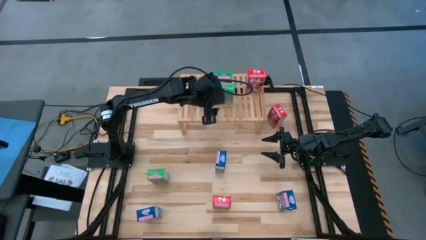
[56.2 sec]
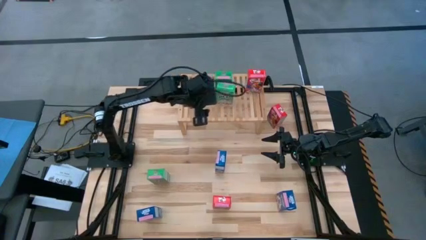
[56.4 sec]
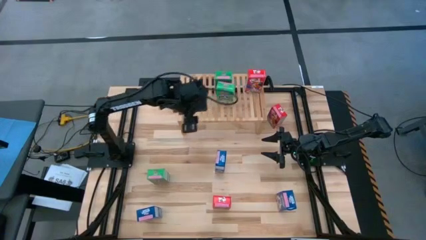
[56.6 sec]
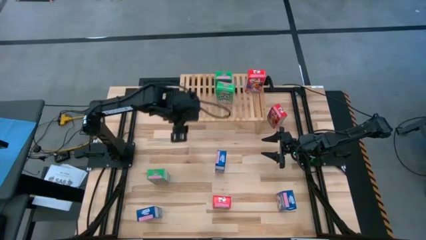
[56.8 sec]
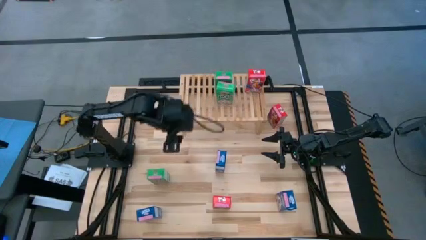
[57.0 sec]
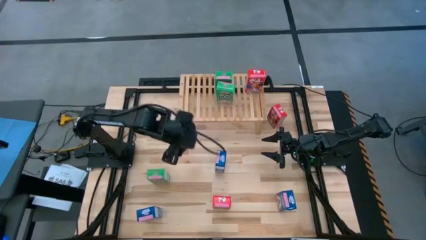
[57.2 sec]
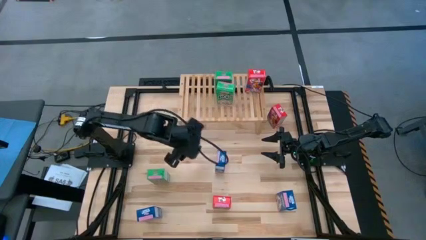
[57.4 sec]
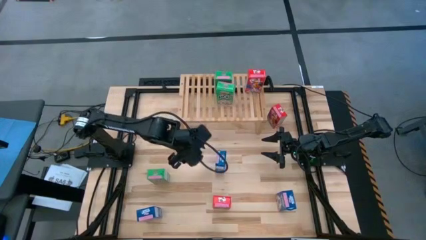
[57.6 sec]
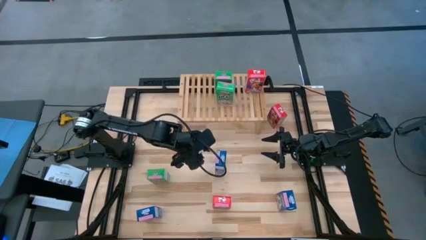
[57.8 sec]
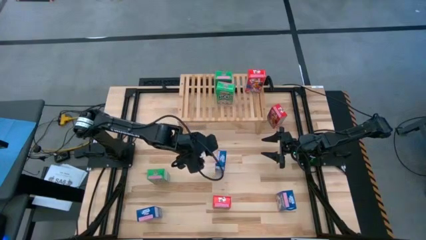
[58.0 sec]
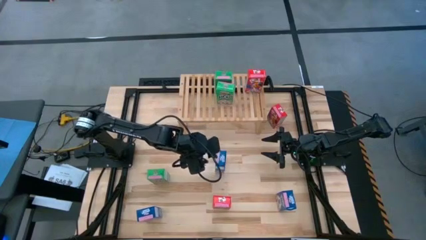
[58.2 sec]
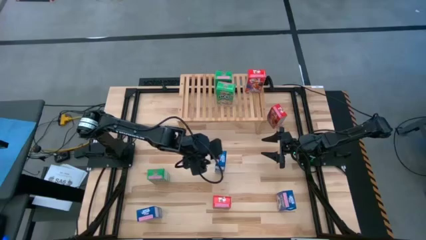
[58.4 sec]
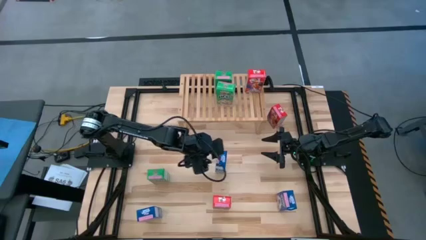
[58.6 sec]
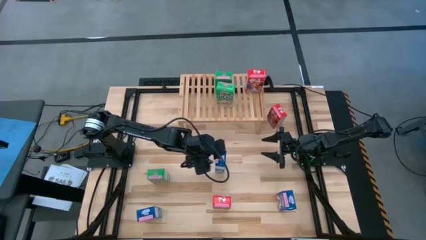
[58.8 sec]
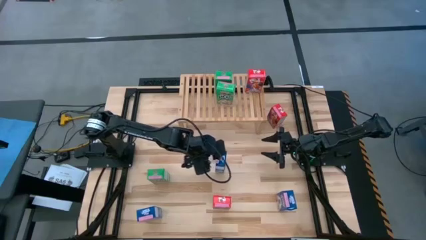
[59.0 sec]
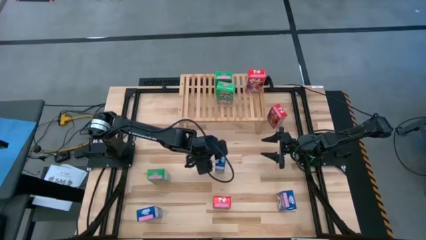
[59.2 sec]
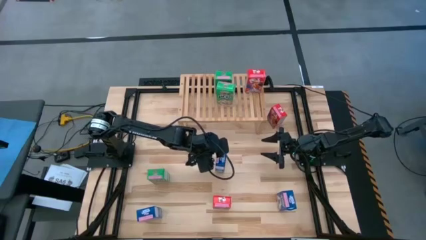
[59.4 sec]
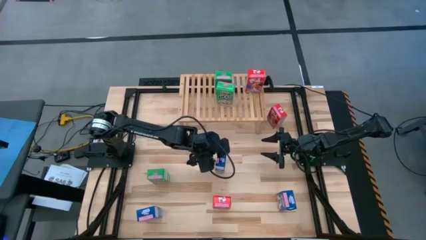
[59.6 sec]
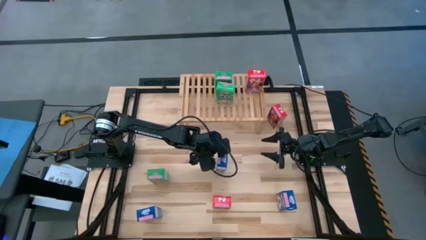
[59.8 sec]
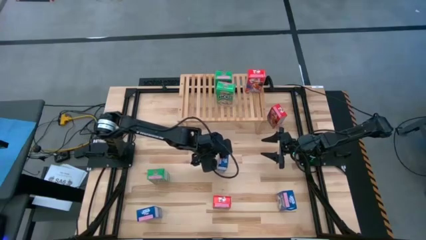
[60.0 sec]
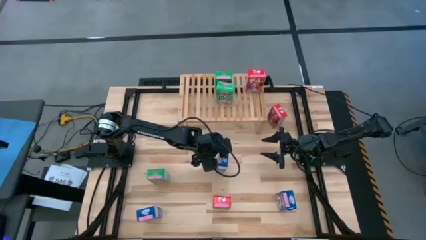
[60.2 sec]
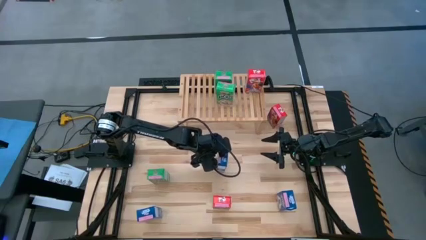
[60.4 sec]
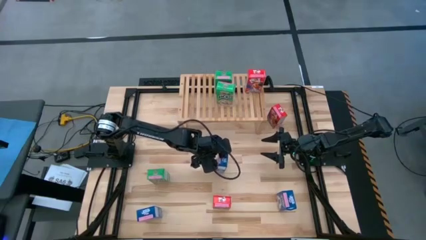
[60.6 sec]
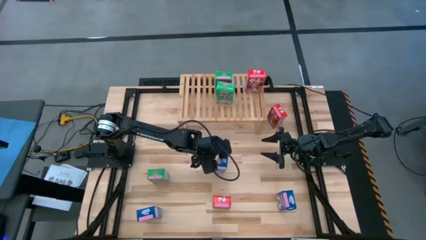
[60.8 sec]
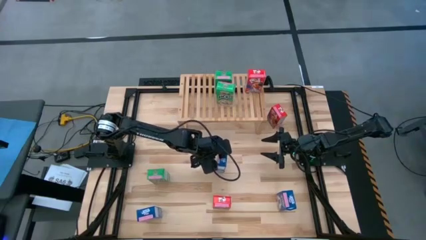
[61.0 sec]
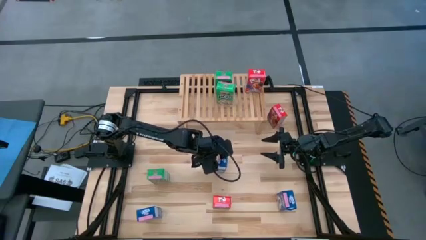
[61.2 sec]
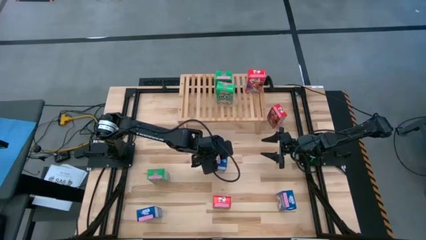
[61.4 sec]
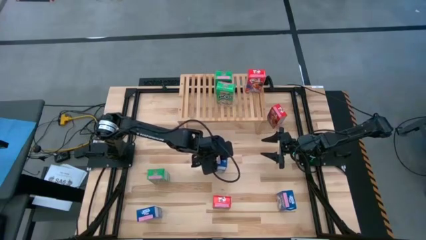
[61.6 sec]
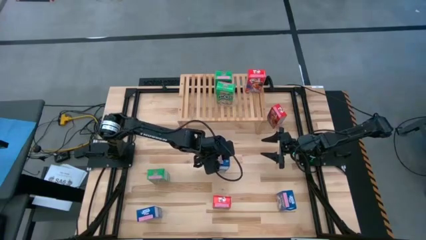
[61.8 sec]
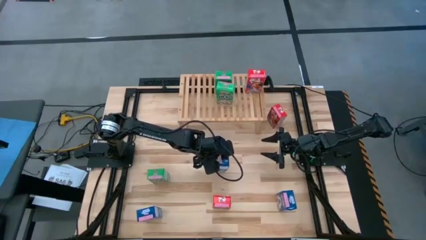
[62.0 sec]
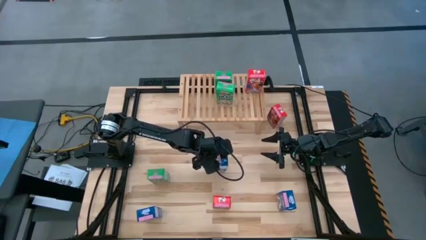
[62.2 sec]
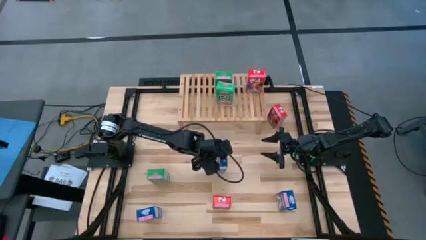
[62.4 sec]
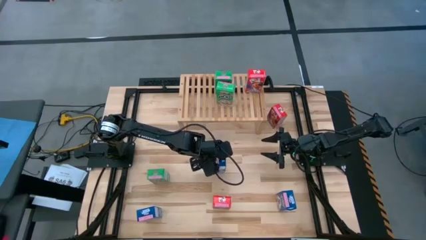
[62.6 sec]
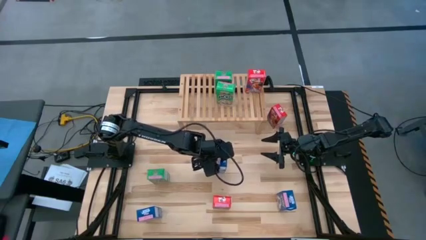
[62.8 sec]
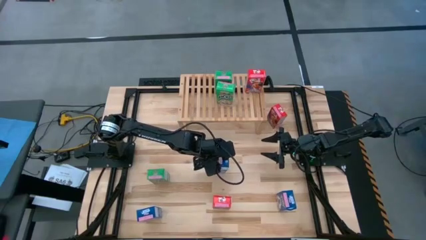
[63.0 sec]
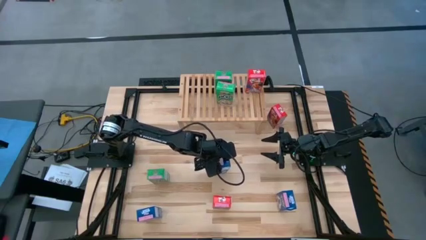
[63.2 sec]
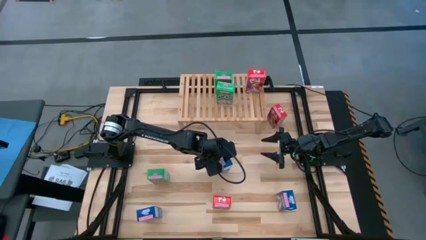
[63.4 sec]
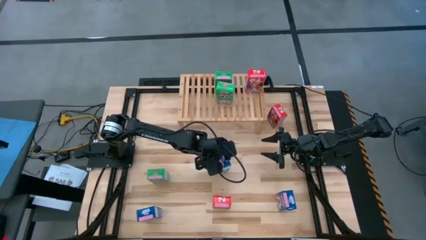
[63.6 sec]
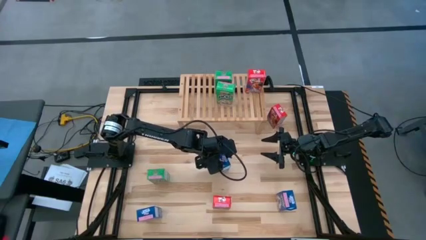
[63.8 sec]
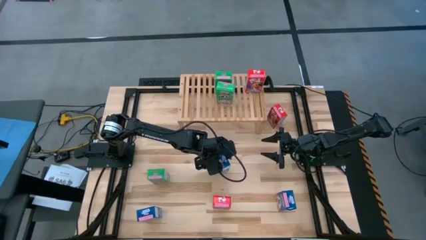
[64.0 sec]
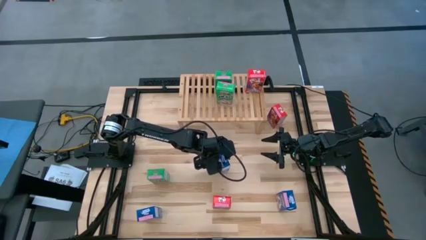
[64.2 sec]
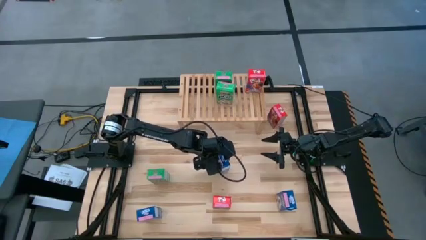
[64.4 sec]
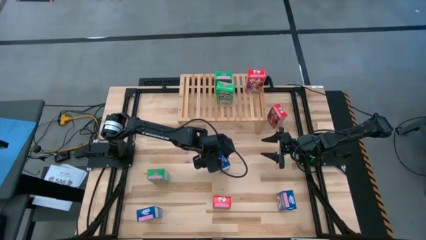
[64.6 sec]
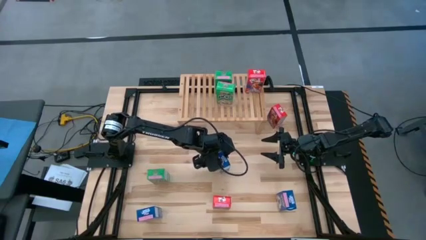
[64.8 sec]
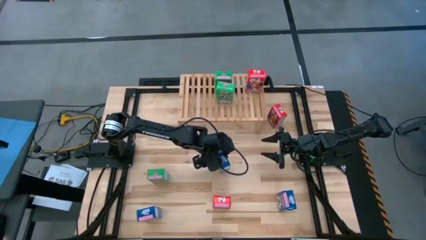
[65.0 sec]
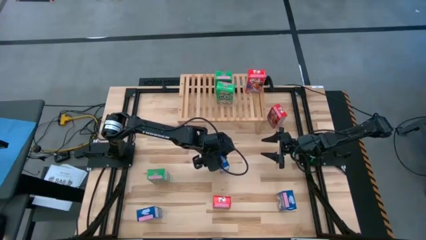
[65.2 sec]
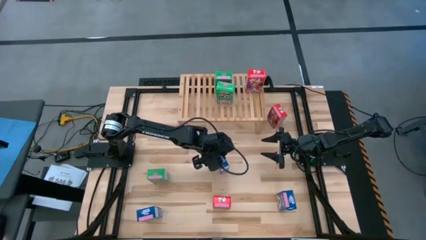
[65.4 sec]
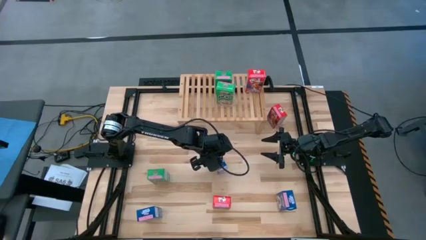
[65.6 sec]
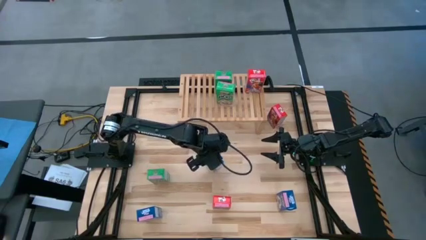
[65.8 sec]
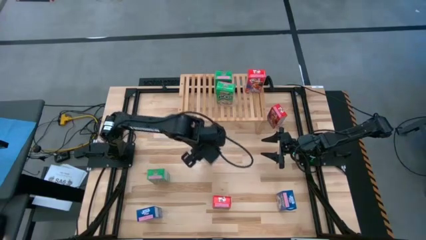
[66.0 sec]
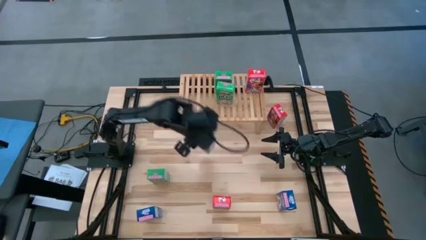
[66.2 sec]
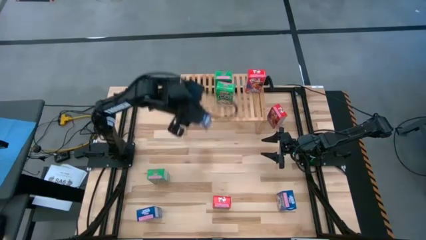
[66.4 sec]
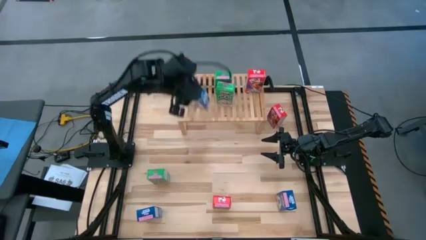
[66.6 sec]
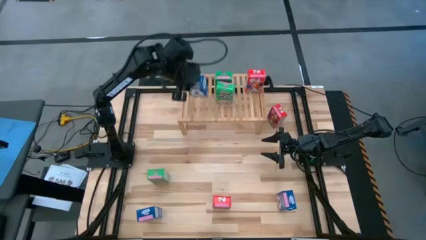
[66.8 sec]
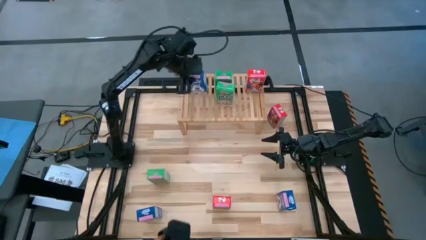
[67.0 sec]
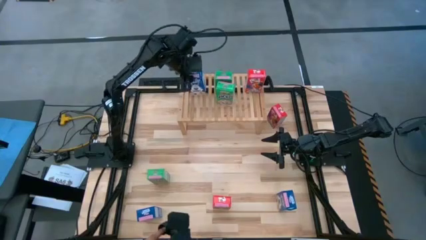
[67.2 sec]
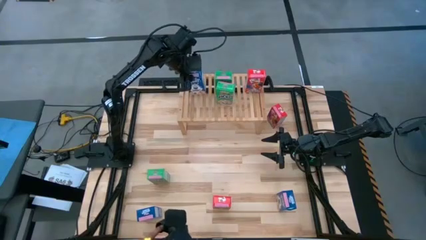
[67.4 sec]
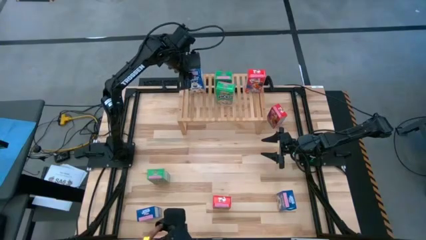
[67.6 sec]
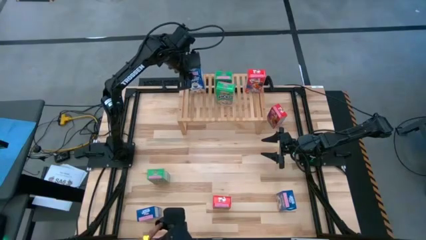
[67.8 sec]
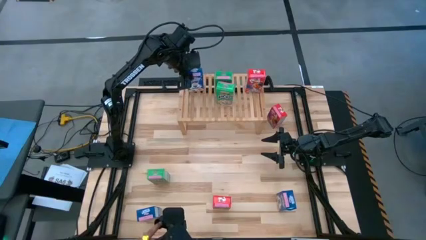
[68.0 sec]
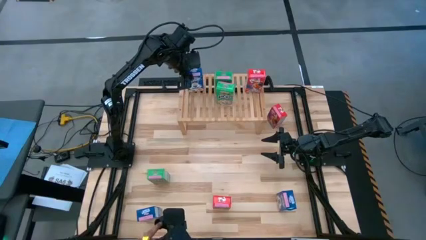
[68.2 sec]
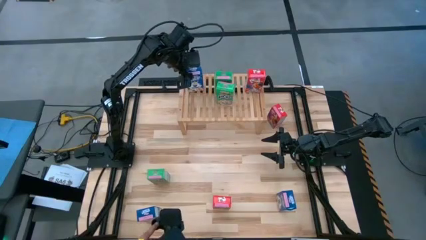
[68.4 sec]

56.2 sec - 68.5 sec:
Task: Stack cereal on shelf
Put the top blue cereal box on the shelf

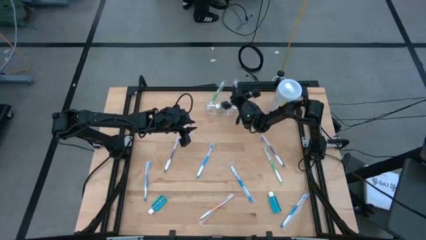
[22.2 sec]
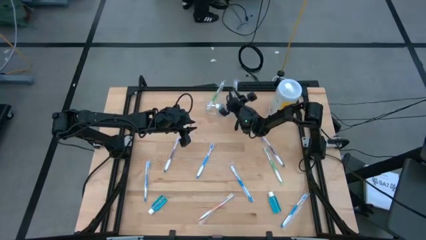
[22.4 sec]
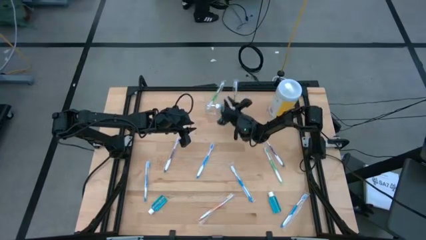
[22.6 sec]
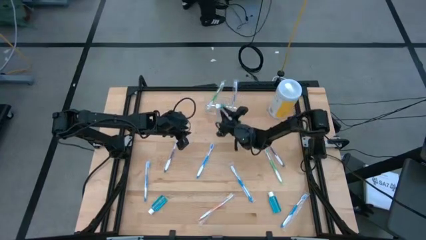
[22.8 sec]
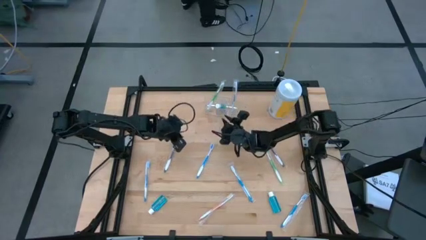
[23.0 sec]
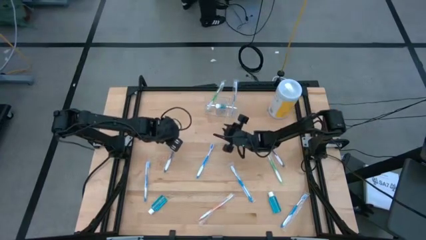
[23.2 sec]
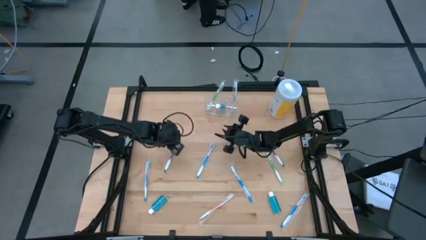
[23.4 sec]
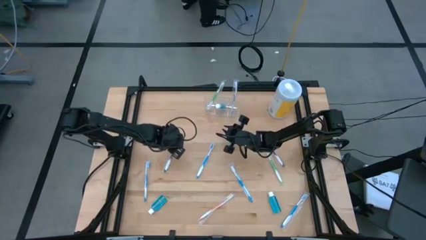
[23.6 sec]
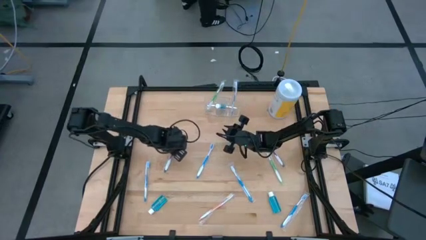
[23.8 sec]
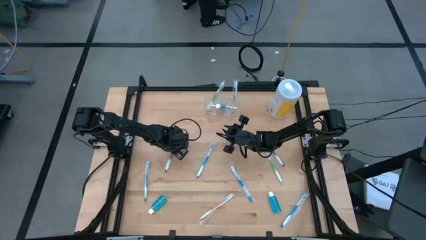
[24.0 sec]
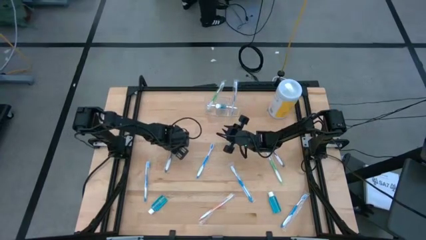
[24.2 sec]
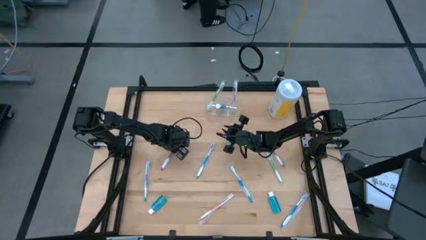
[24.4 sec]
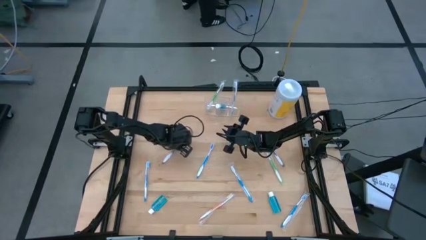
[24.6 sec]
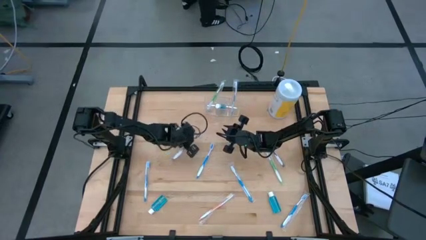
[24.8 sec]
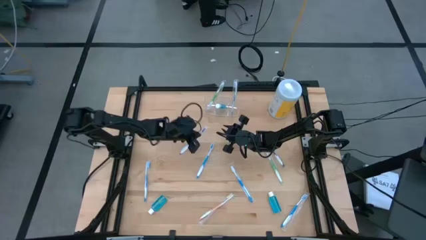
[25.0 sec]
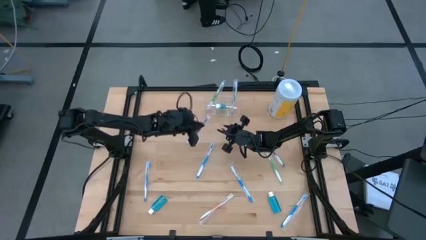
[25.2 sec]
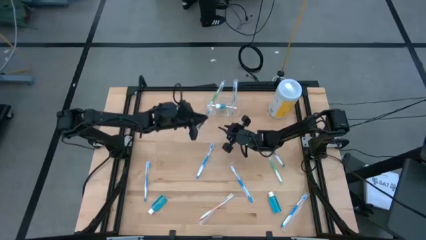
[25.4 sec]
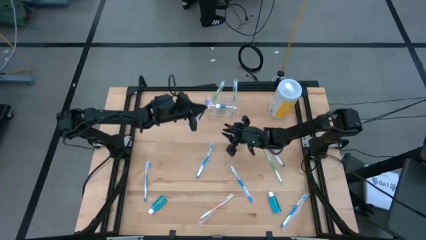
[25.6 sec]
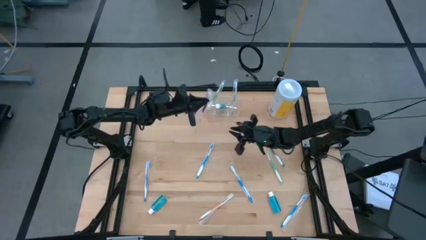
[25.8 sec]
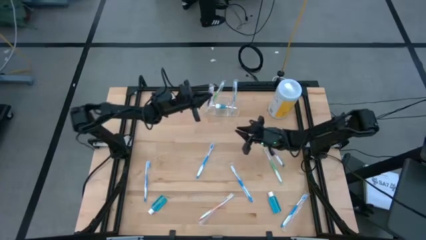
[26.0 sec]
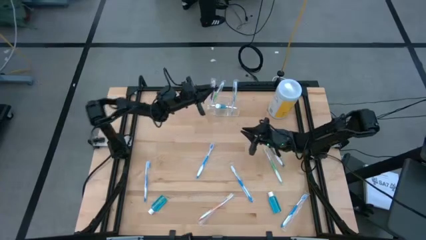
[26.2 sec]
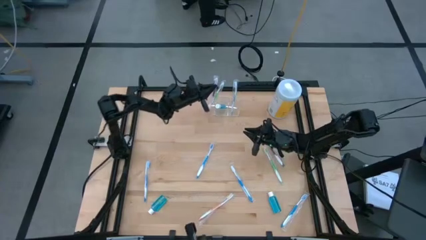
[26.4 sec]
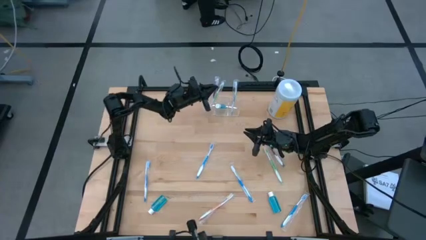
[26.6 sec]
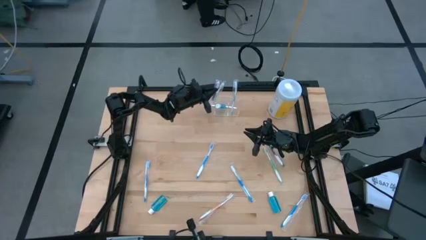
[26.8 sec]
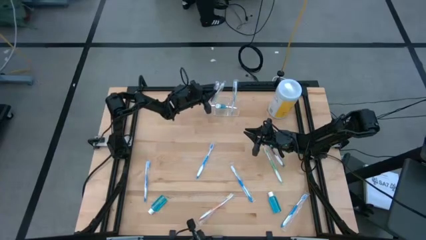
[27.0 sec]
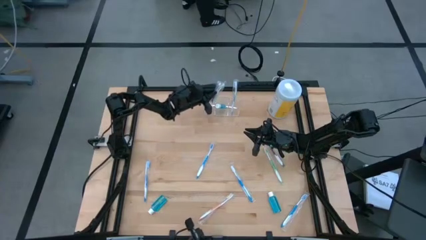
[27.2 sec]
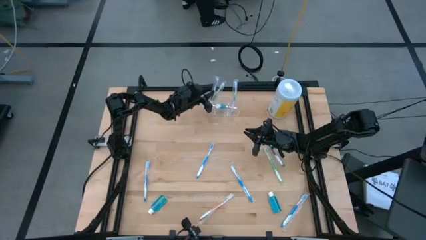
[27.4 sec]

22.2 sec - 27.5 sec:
Task: Pick & Place toothbrushing station
Put the violet toothbrush into the transparent organizer
